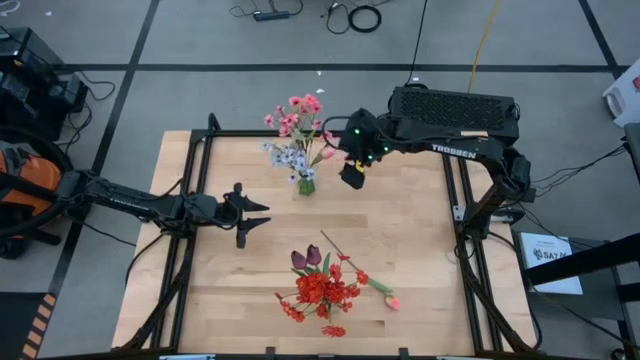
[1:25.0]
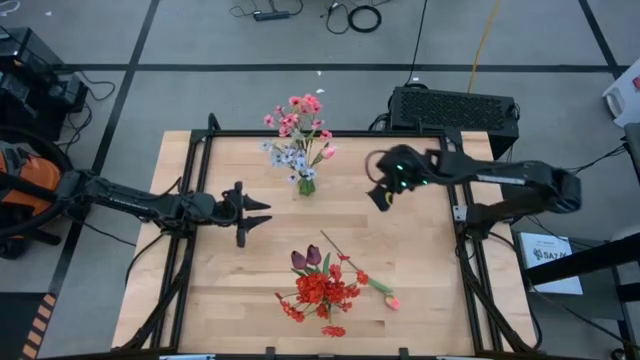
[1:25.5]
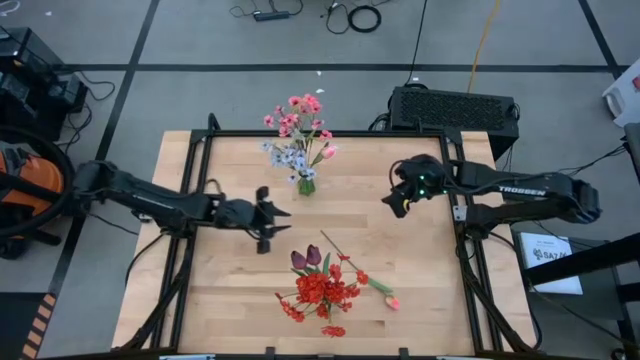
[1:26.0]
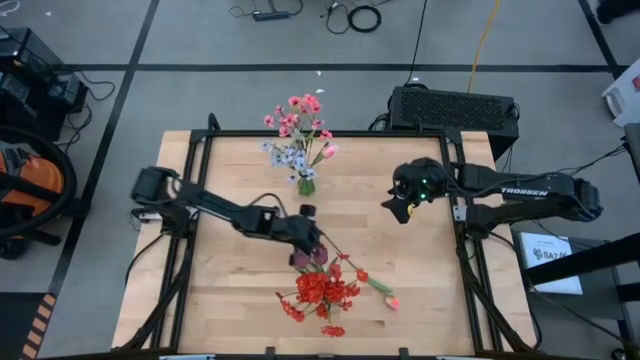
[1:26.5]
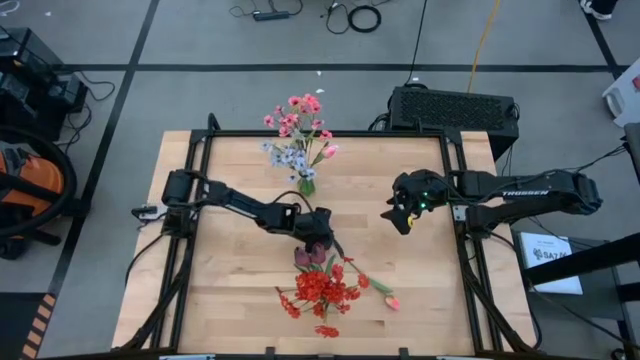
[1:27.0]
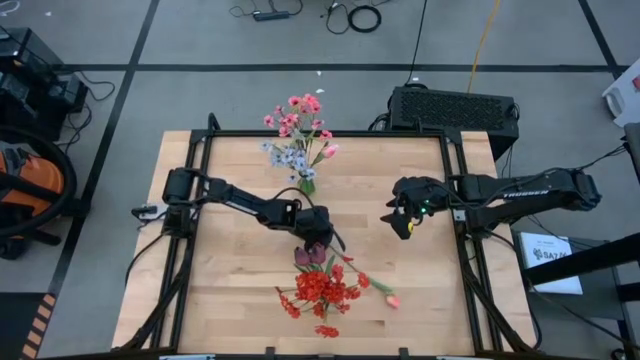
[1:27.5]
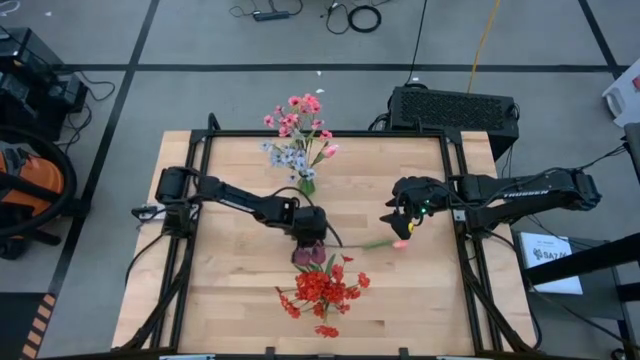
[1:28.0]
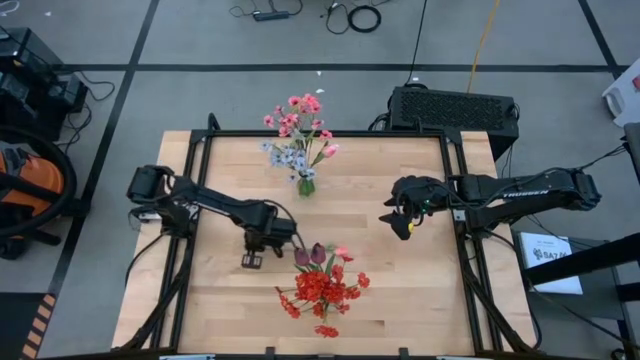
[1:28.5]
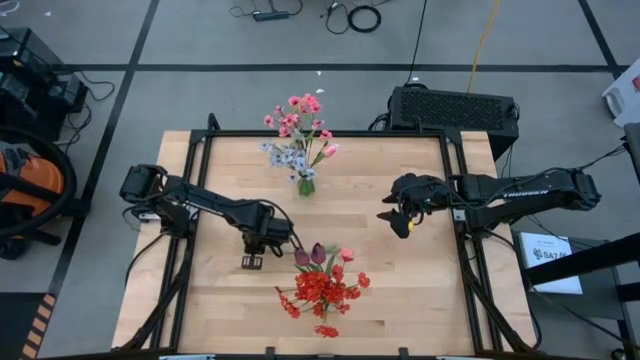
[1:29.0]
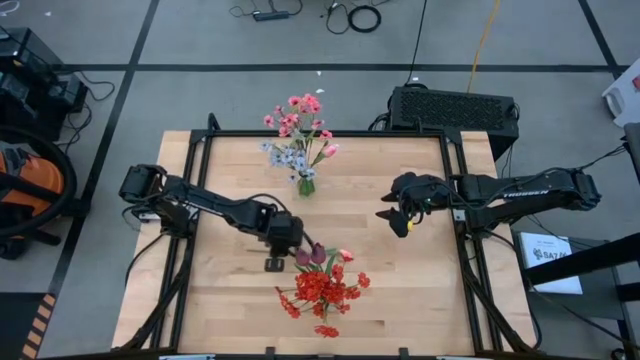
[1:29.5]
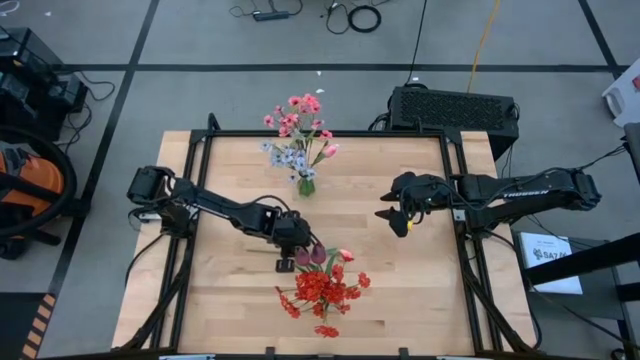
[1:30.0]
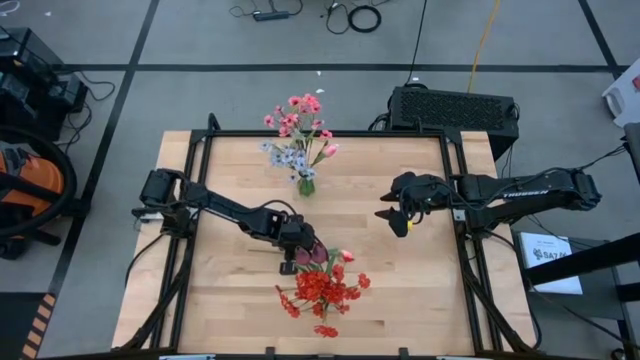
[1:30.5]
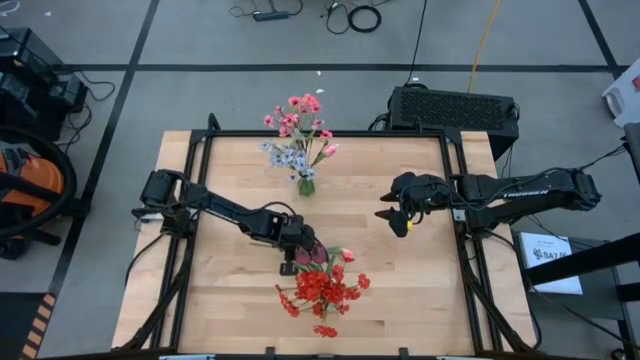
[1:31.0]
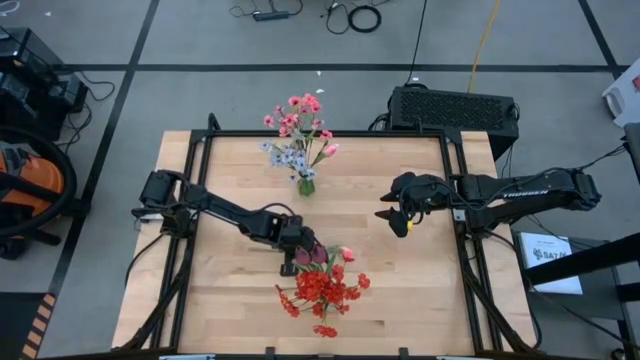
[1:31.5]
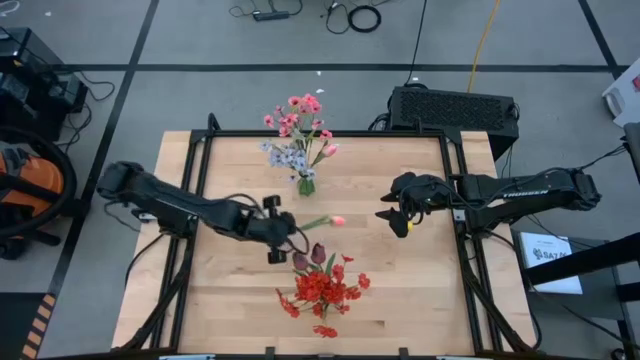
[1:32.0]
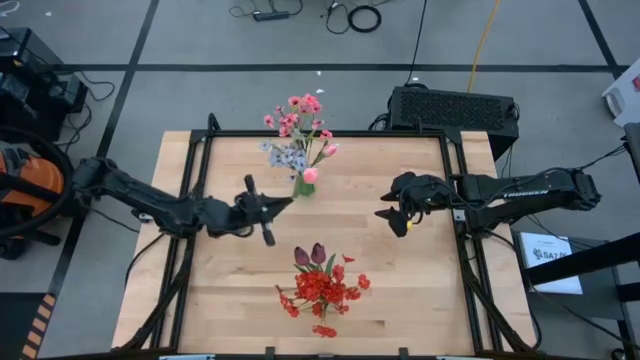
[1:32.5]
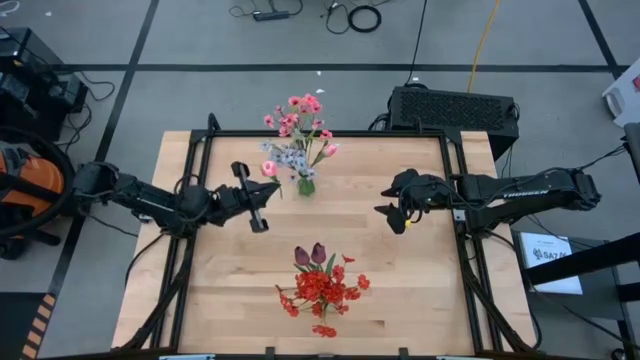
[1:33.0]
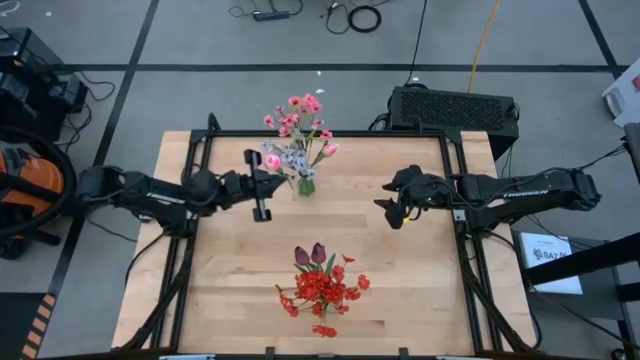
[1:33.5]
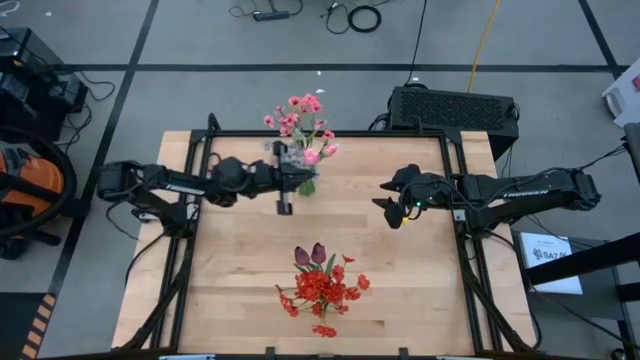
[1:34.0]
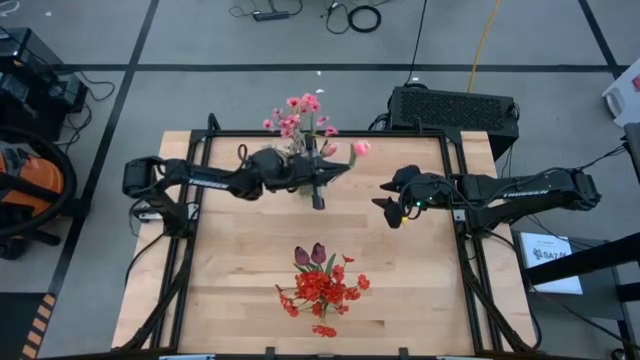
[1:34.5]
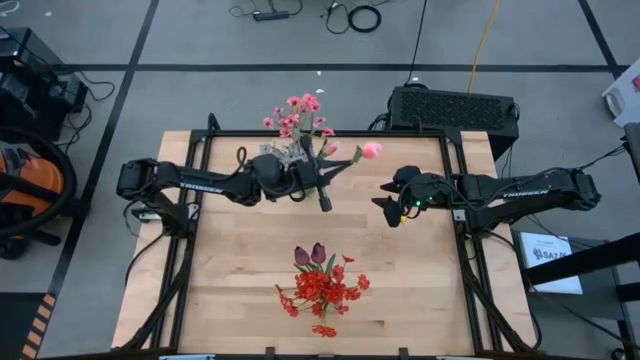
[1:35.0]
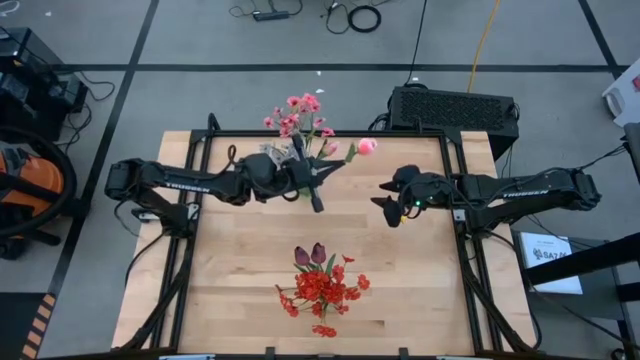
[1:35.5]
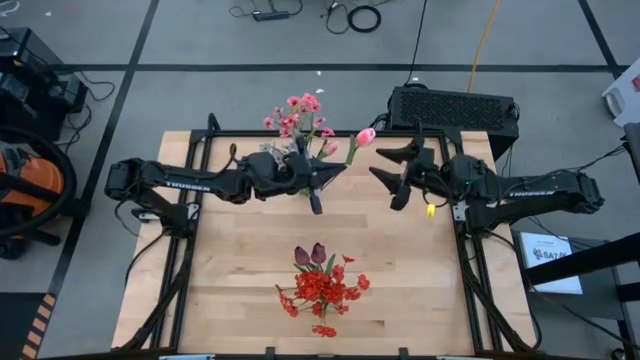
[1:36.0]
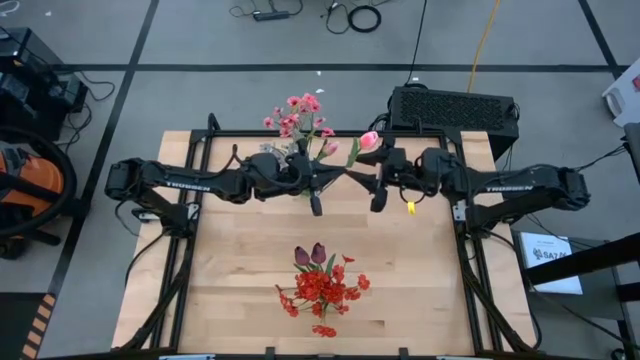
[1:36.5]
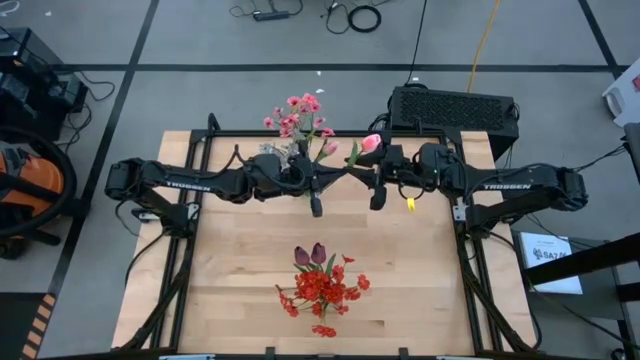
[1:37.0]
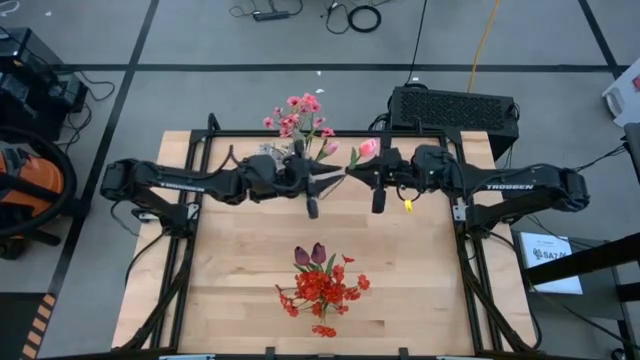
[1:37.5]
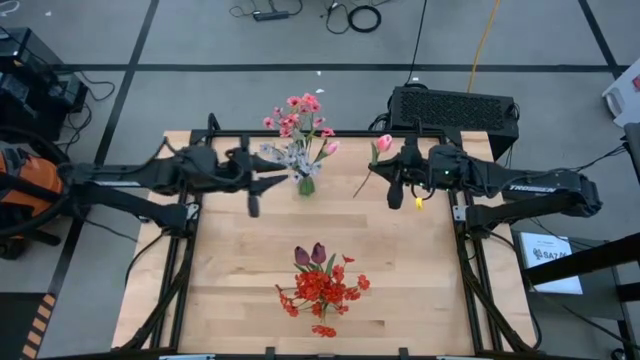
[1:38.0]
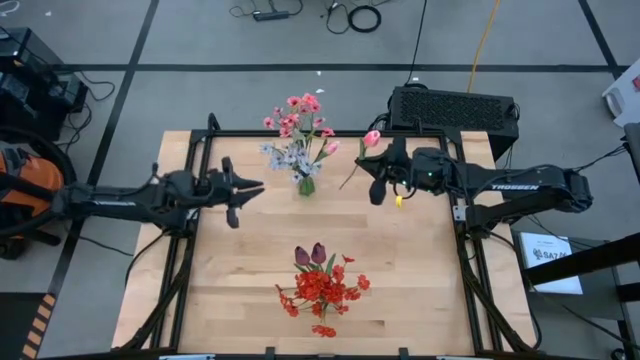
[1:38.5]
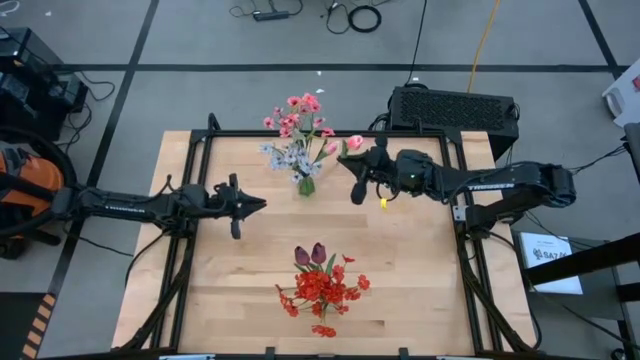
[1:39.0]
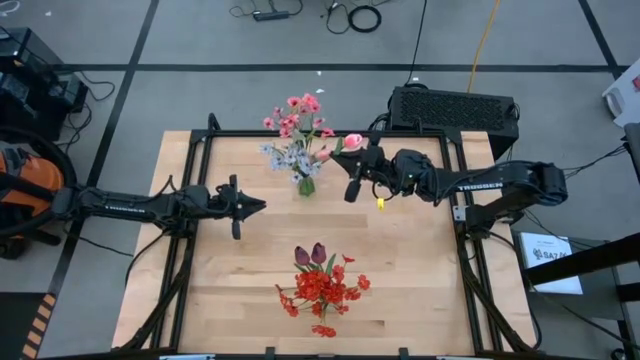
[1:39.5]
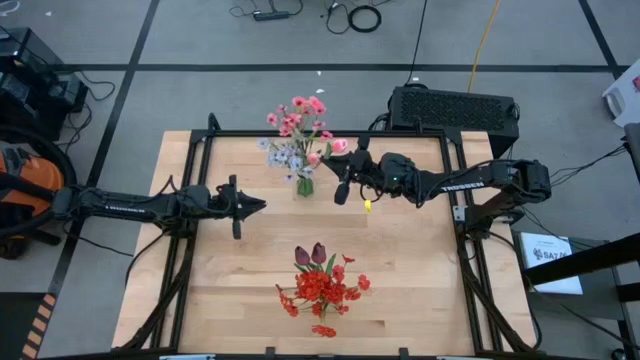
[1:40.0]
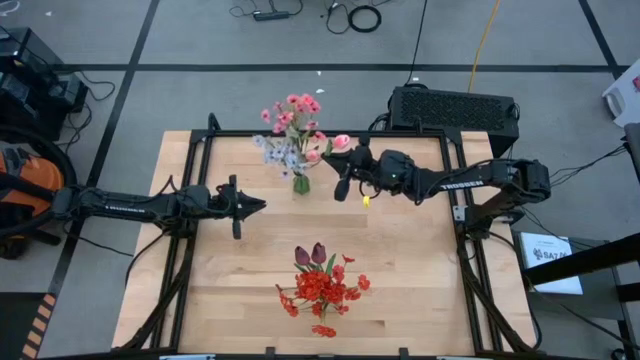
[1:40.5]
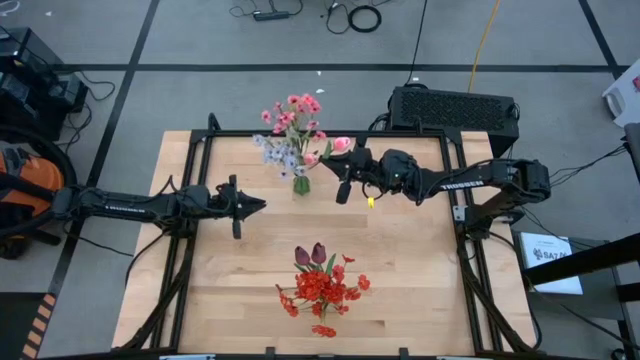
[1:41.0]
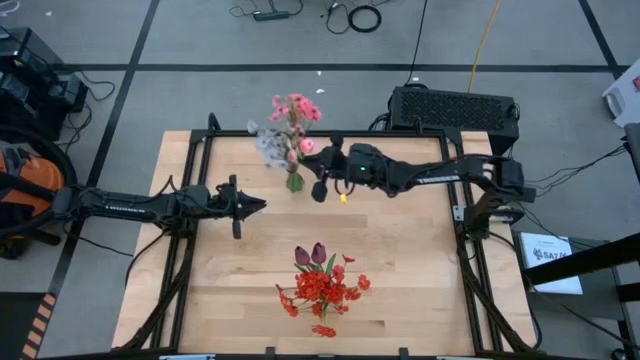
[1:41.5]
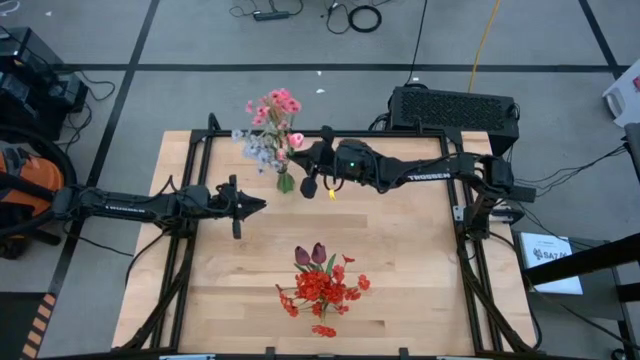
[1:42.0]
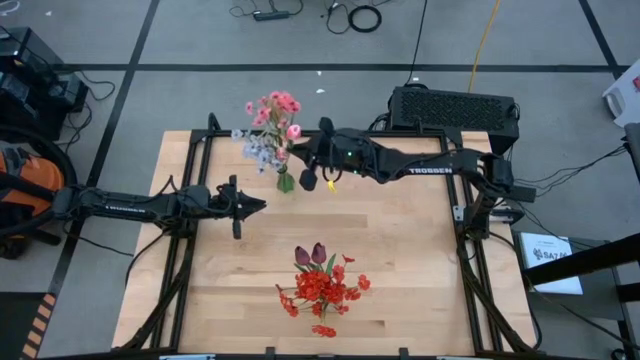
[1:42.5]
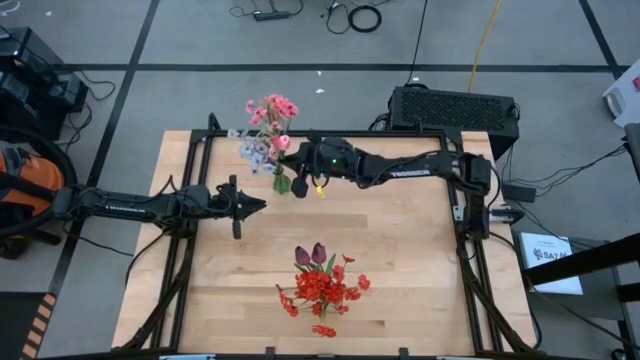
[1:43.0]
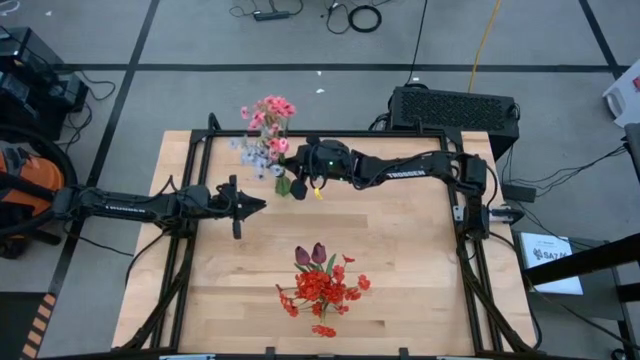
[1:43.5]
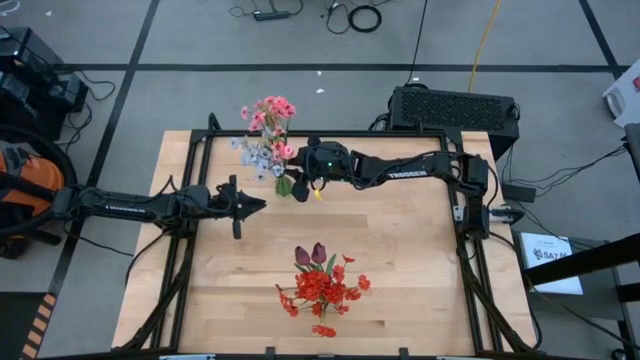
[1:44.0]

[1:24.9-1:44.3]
Task: Sort flowers into vase by color
Put the pink tulip into the green vase
